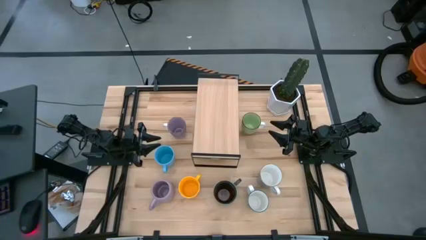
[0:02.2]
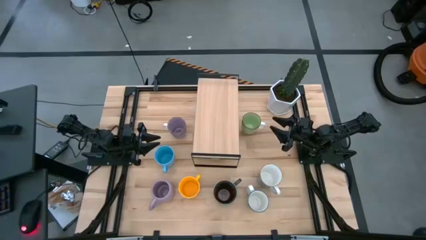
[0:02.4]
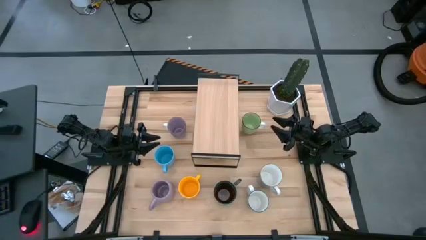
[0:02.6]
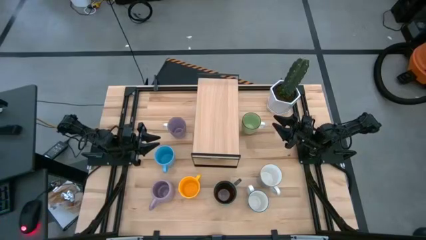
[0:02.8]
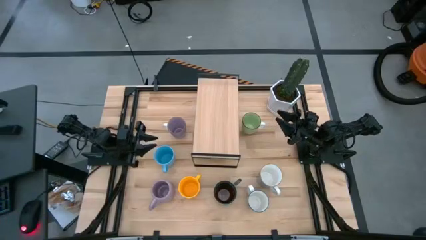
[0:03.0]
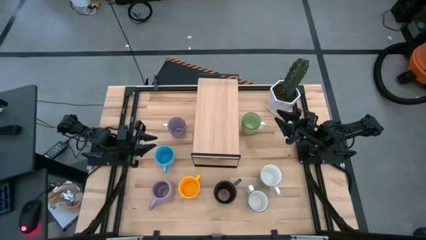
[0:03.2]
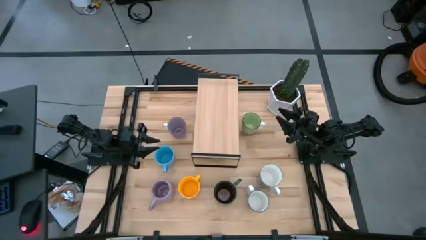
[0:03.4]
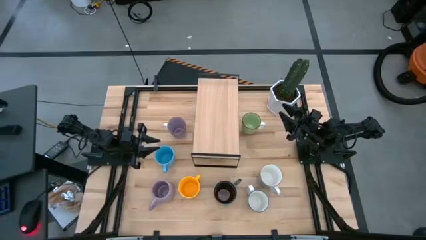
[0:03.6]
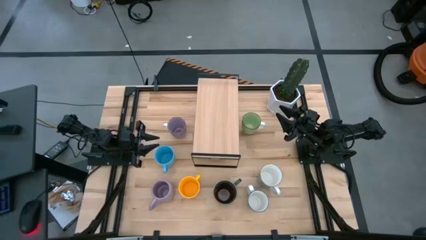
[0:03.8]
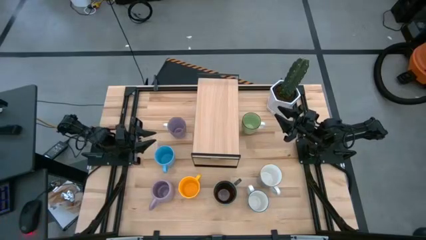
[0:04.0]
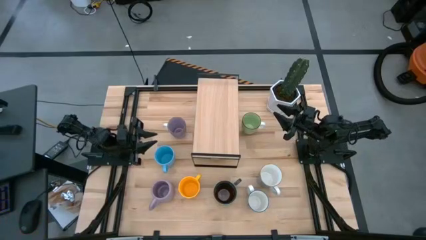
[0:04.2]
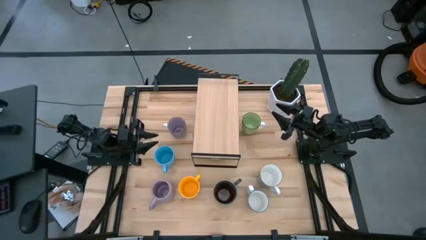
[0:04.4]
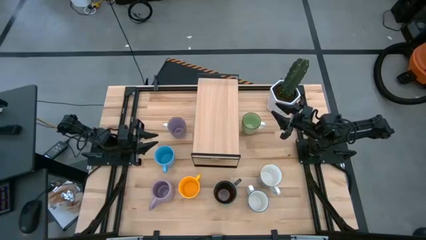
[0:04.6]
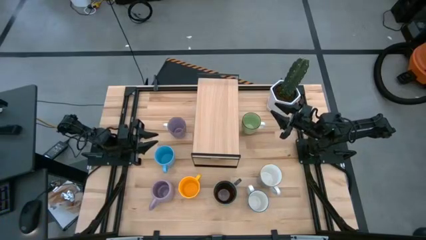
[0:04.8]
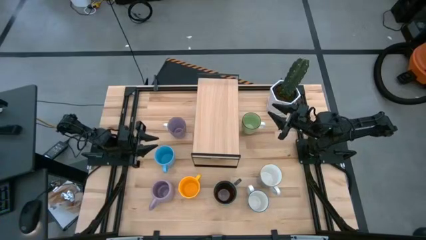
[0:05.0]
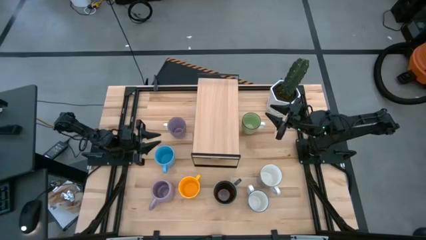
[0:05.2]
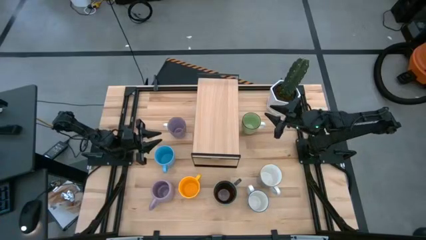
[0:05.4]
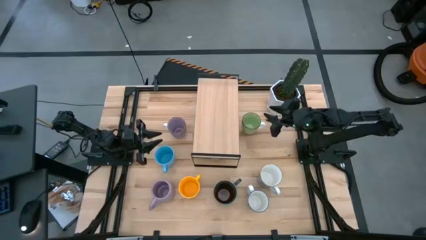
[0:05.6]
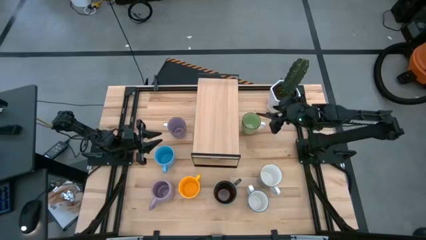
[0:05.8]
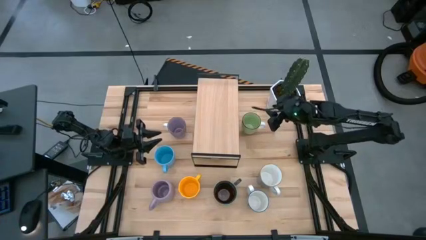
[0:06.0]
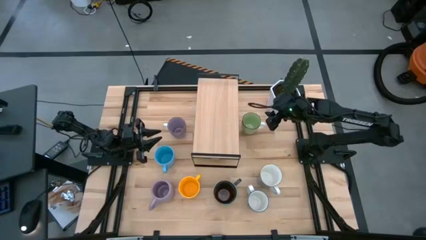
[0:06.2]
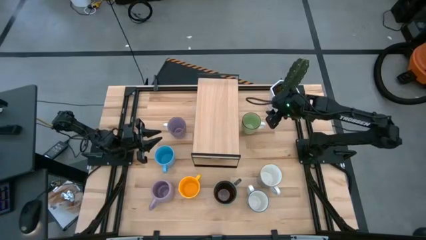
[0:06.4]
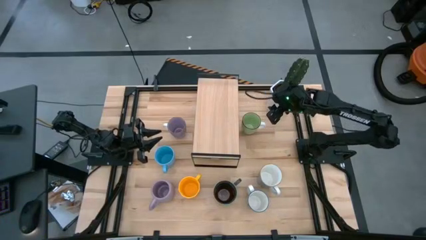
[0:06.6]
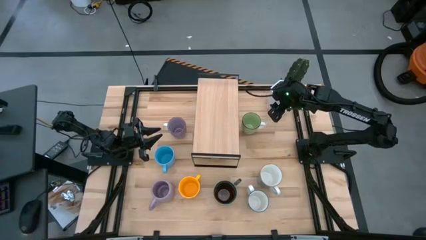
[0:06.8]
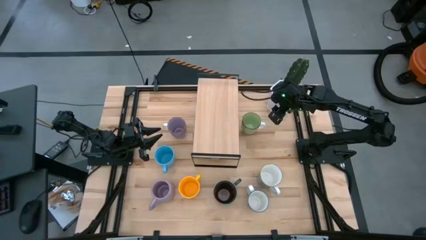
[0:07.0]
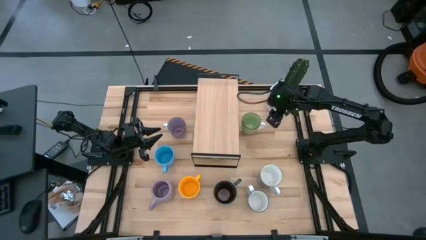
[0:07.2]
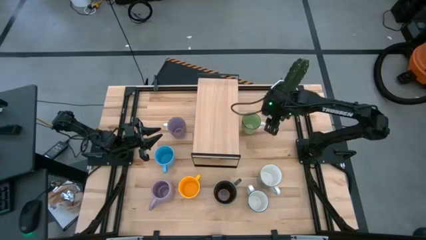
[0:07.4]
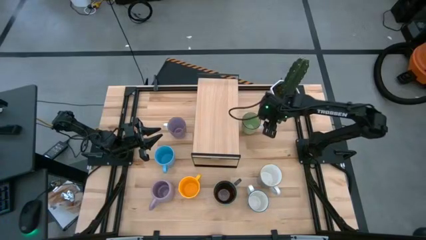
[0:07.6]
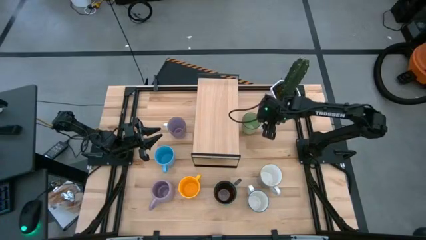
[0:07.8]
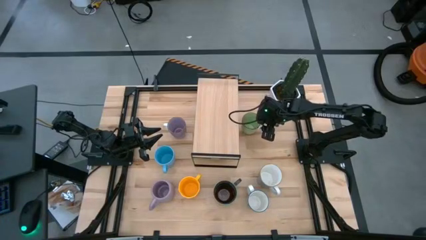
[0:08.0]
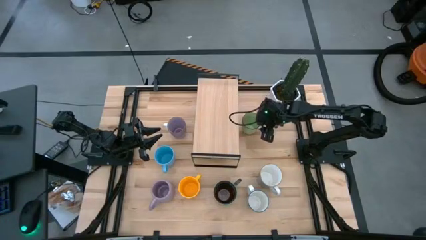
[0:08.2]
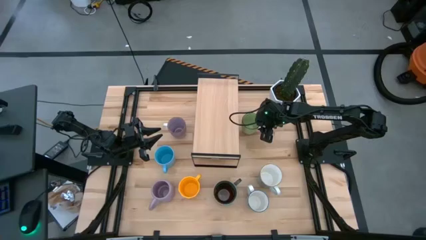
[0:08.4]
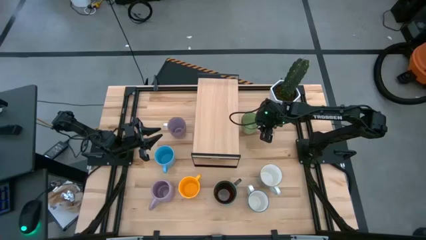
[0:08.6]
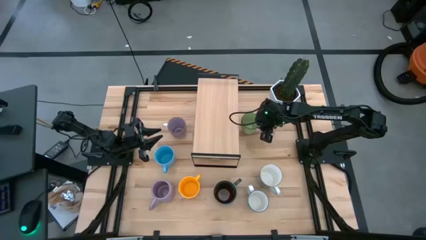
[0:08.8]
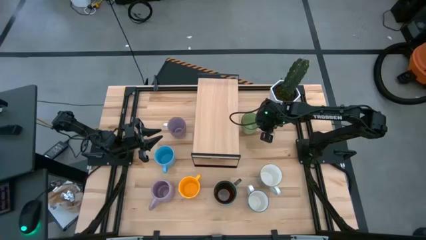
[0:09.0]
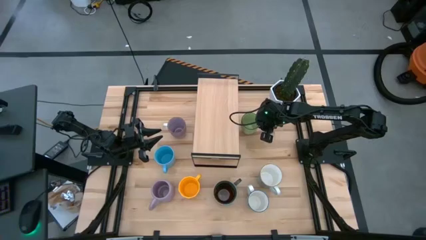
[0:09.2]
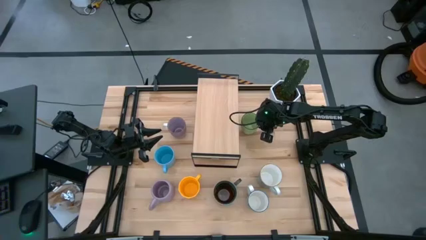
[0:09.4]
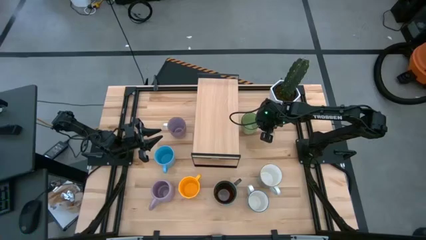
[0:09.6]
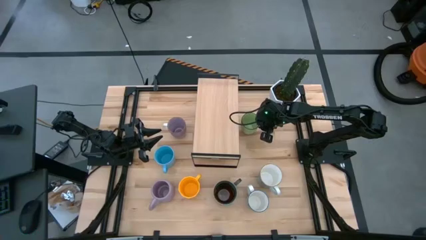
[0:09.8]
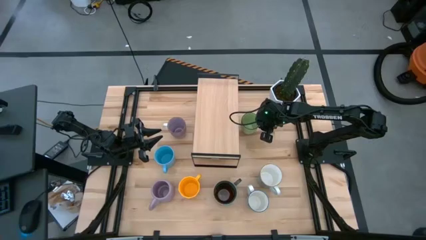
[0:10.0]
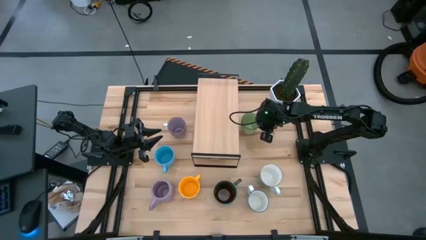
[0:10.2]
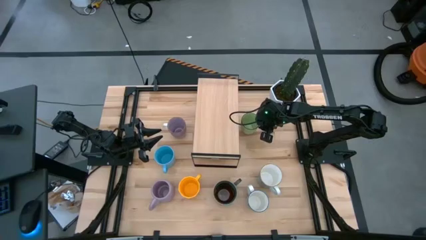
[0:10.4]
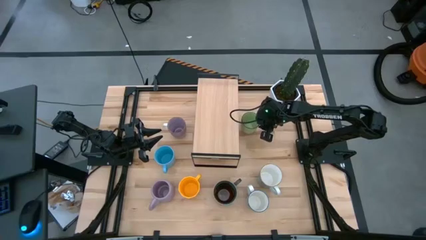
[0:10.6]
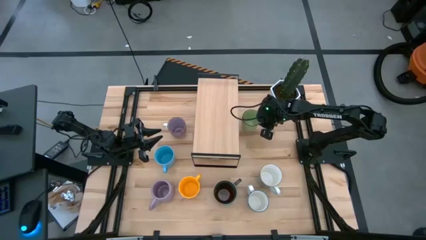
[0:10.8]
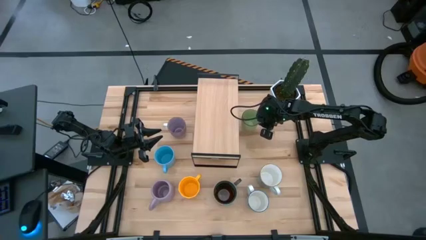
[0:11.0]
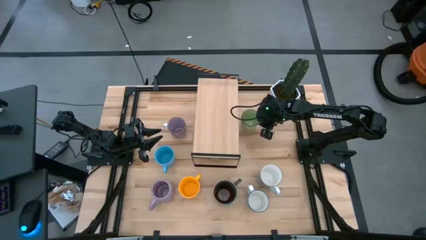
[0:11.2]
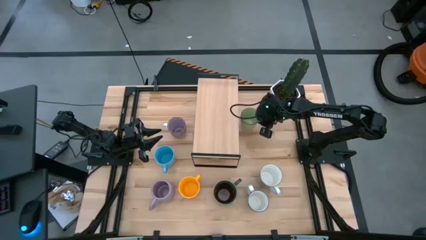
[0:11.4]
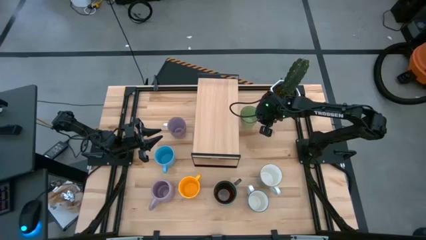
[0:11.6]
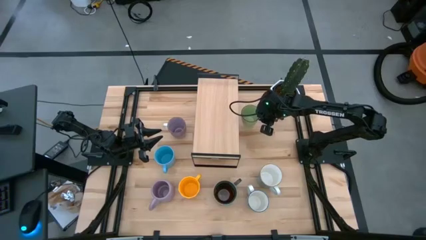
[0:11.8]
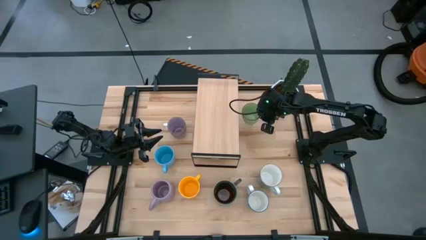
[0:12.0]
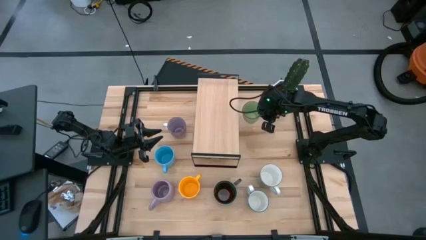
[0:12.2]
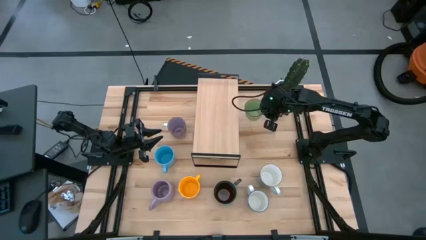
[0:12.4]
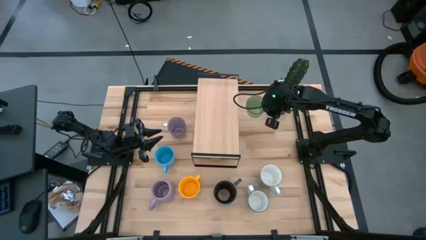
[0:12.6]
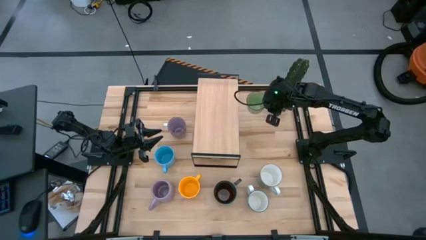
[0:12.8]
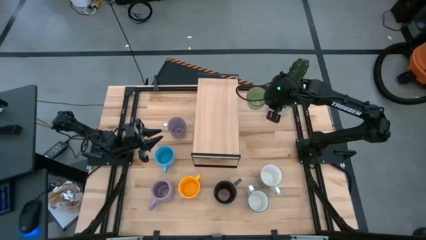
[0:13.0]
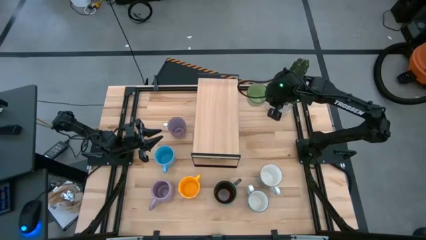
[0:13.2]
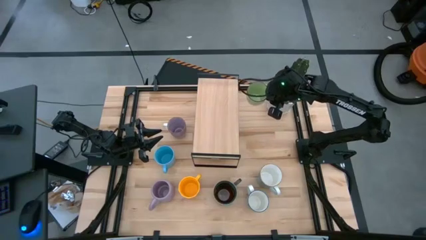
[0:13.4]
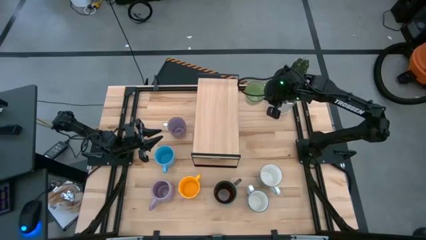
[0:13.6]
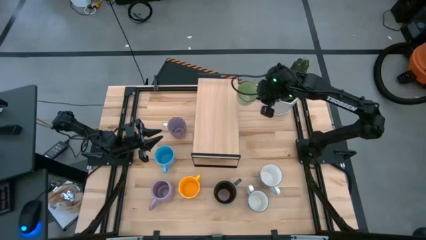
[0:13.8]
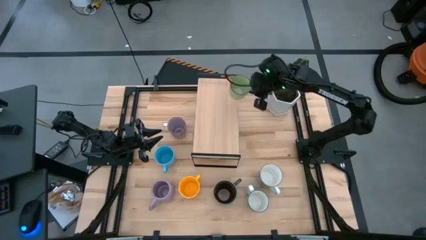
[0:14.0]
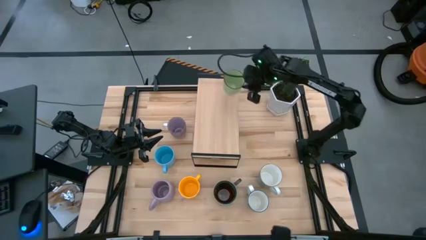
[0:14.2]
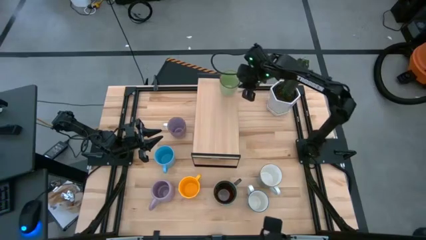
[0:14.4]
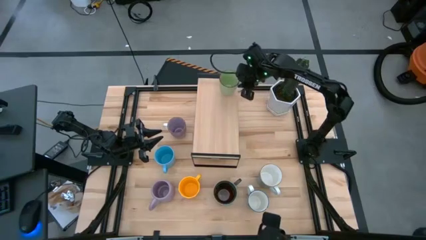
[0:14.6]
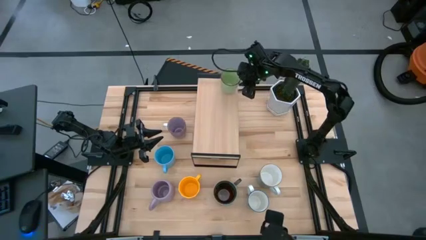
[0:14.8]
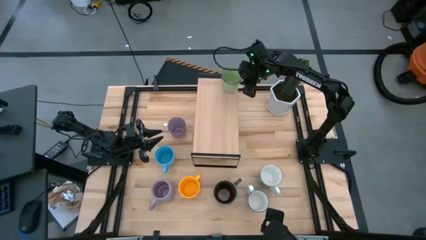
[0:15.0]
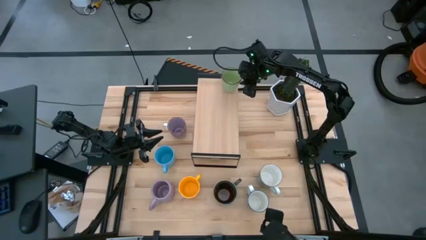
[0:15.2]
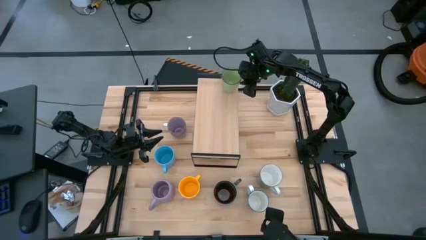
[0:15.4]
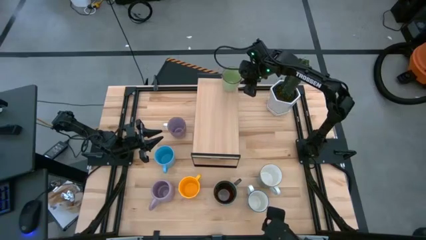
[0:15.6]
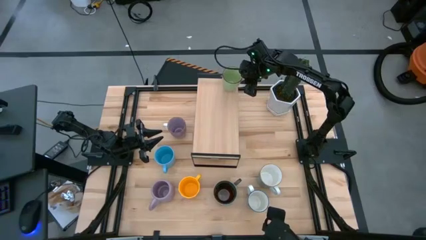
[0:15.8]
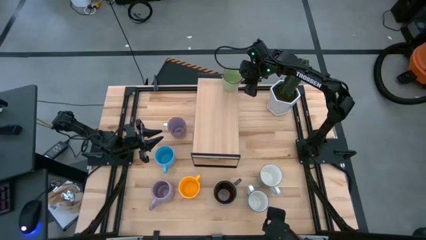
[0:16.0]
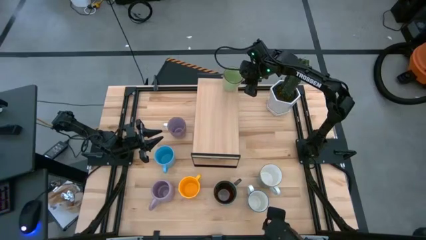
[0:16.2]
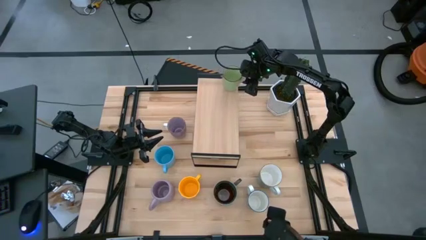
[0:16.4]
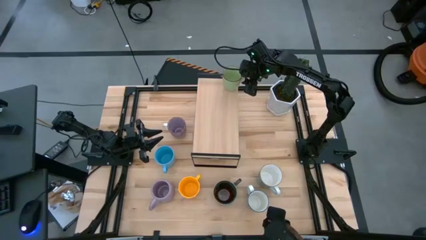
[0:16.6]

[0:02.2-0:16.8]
Task: Place coffee mugs
Put the green mug on the shelf
